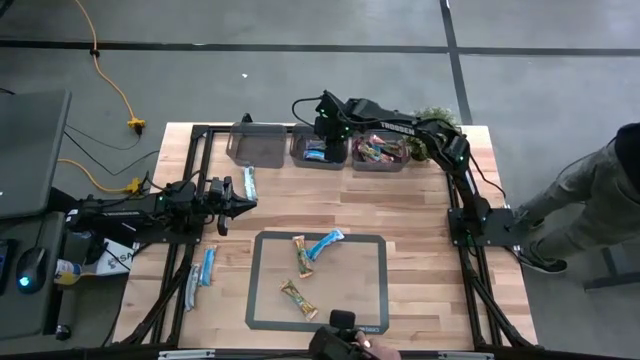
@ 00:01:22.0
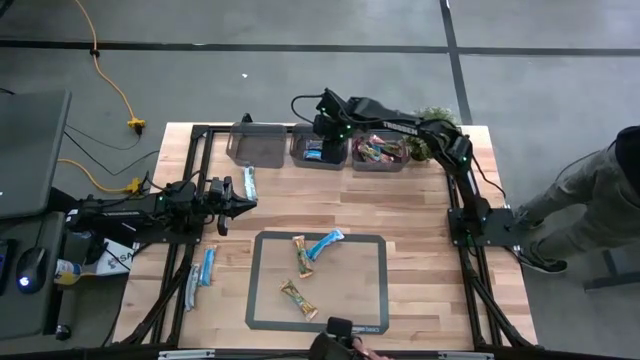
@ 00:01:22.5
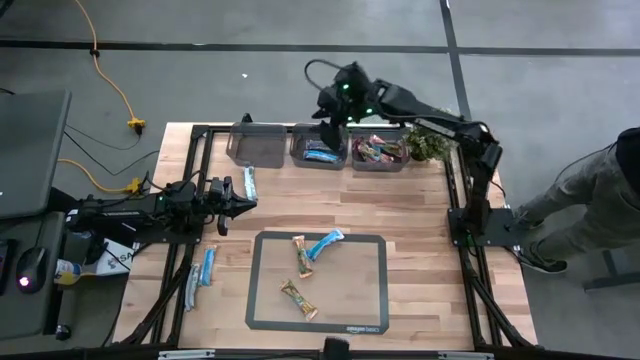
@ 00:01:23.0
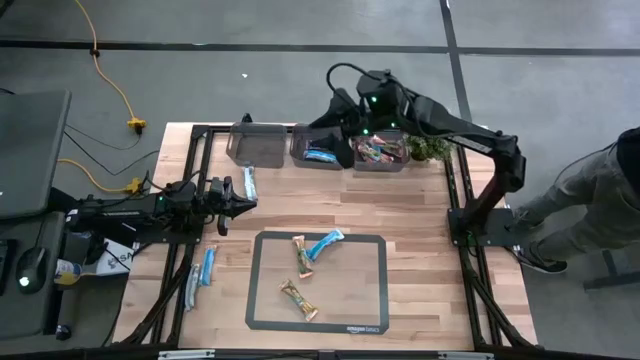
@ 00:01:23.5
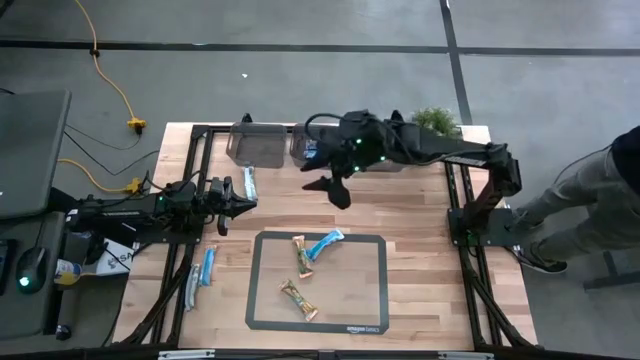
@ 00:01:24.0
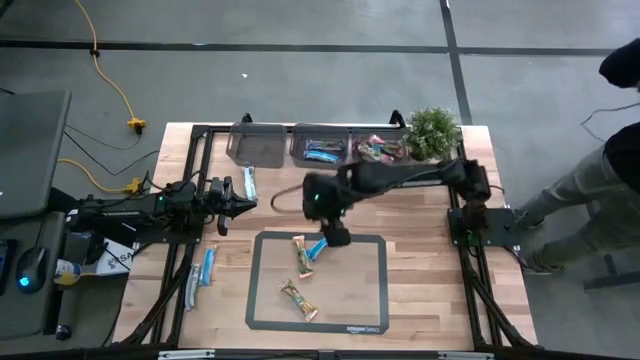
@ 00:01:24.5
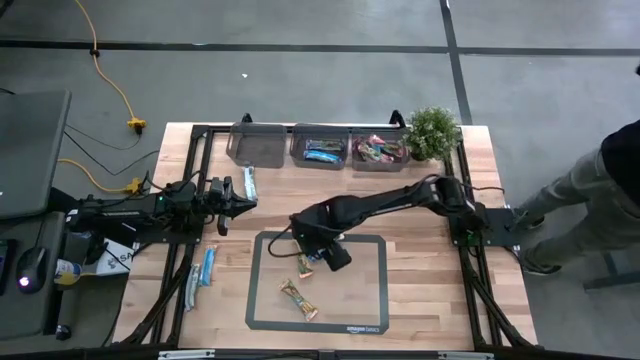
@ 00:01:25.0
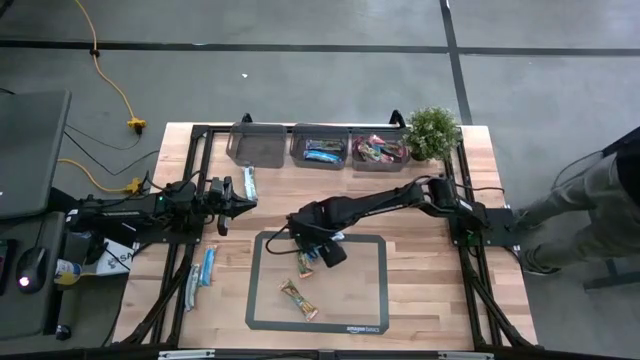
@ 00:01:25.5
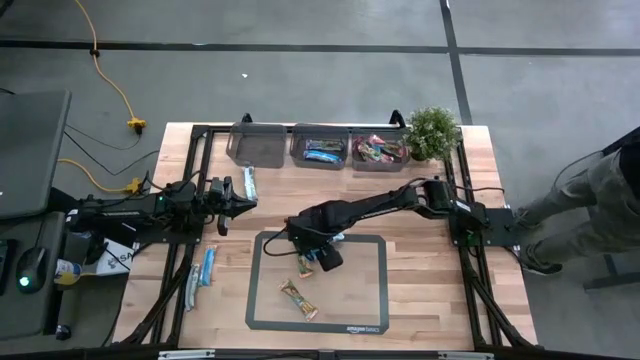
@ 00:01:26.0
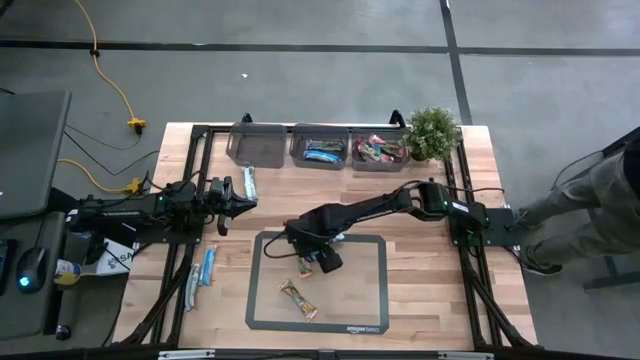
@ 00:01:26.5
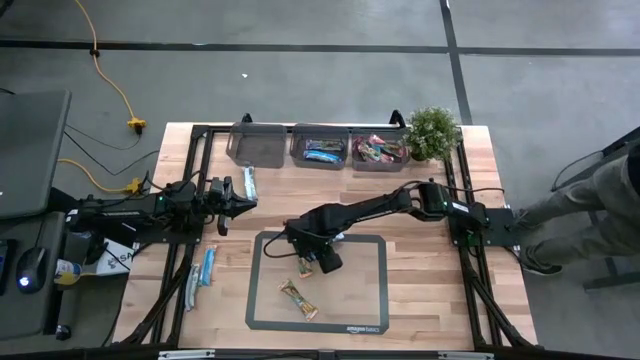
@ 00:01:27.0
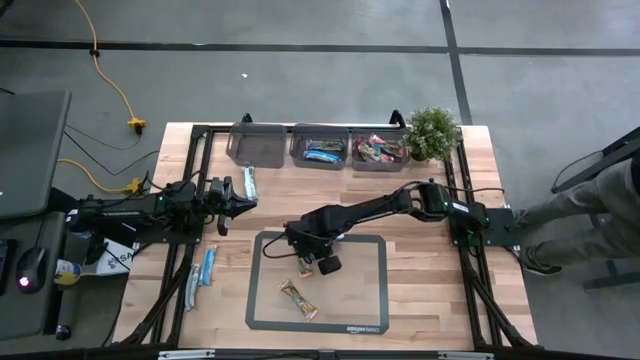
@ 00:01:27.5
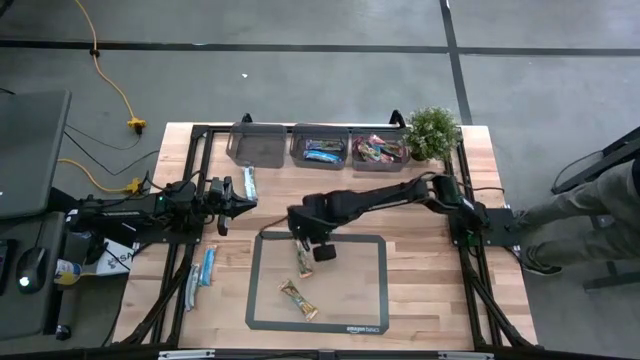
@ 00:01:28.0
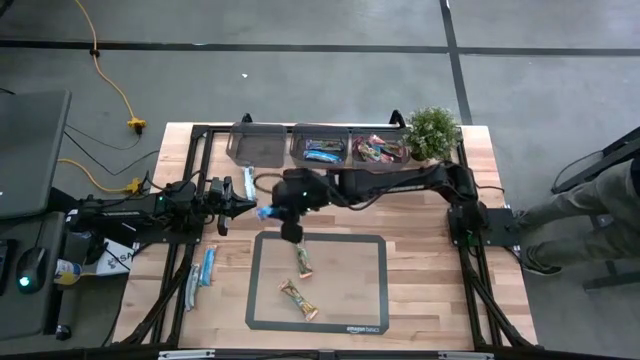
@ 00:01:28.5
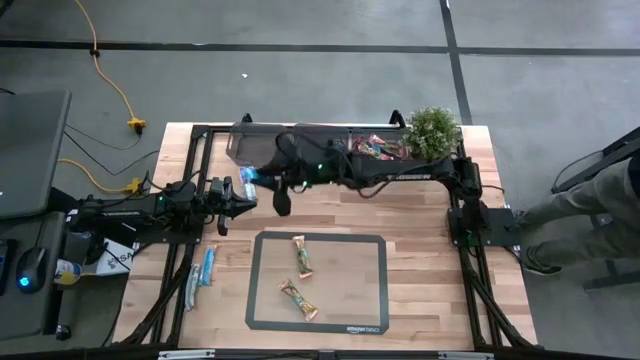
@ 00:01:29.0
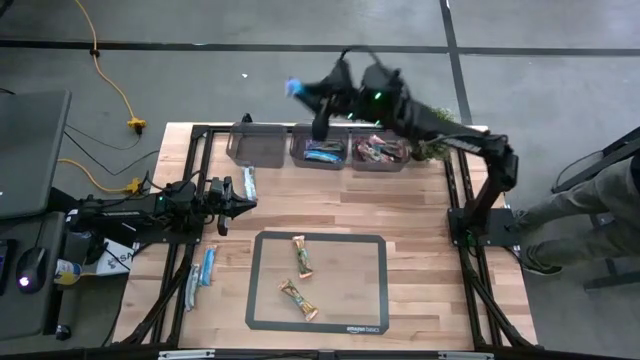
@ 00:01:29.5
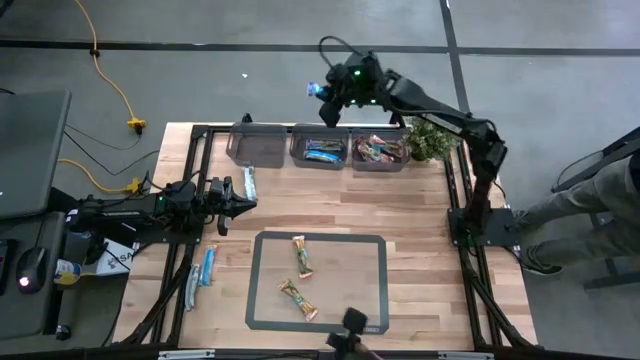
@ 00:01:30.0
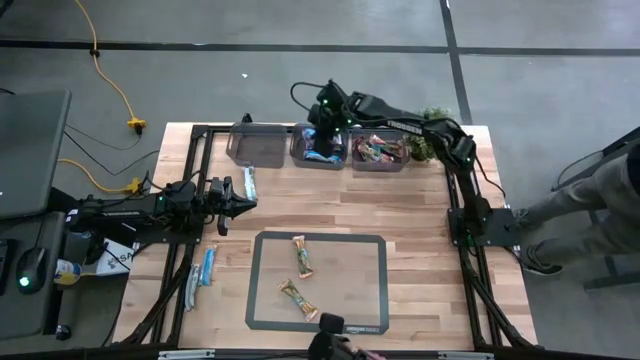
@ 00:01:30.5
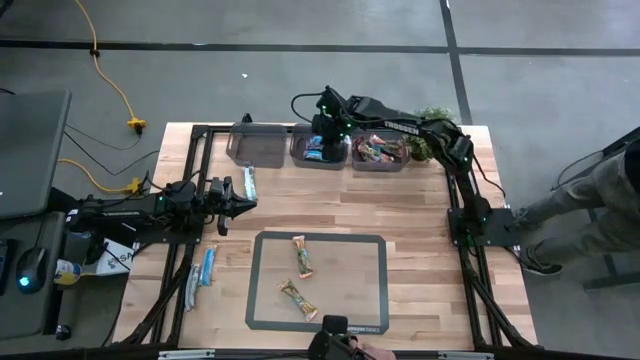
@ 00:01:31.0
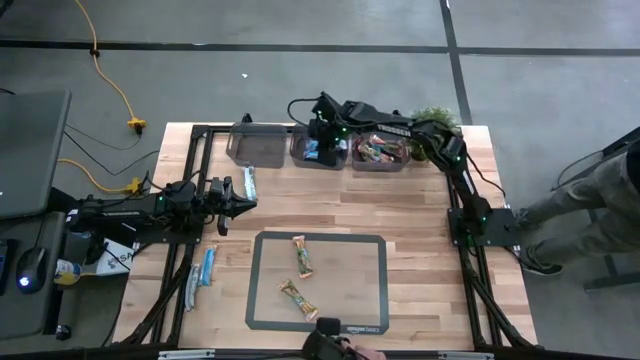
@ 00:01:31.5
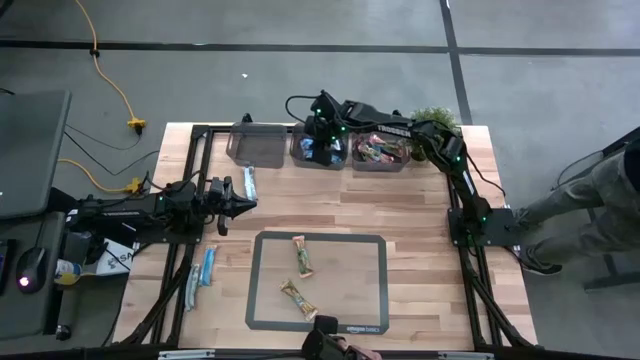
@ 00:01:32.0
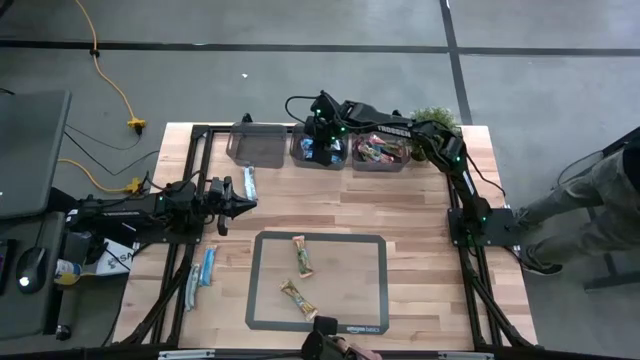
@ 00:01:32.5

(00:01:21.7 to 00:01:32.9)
Task: Pick and place Granola Bars by type
Put the blue granola bar into the middle black bin

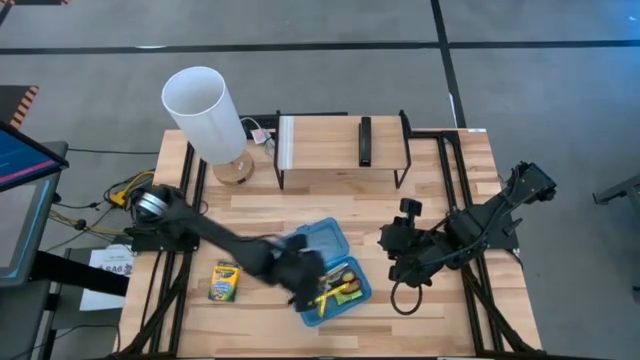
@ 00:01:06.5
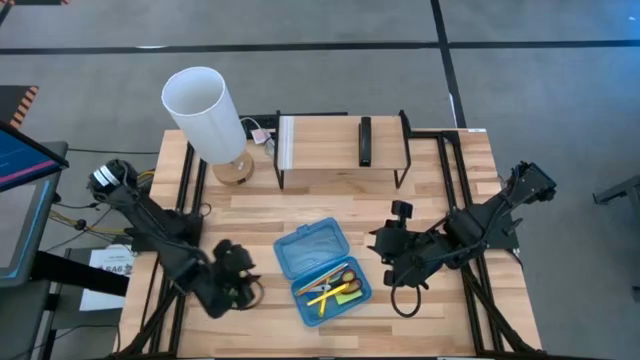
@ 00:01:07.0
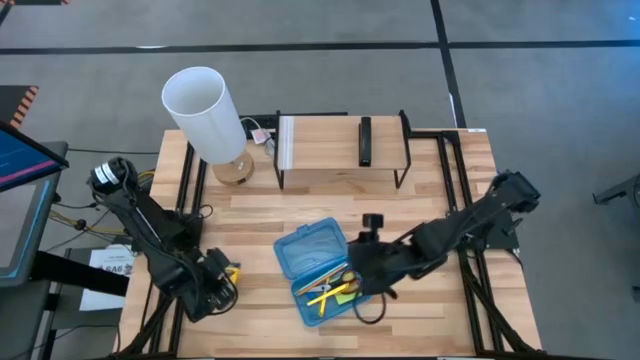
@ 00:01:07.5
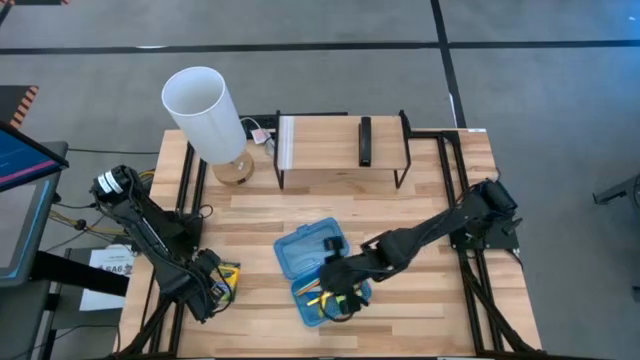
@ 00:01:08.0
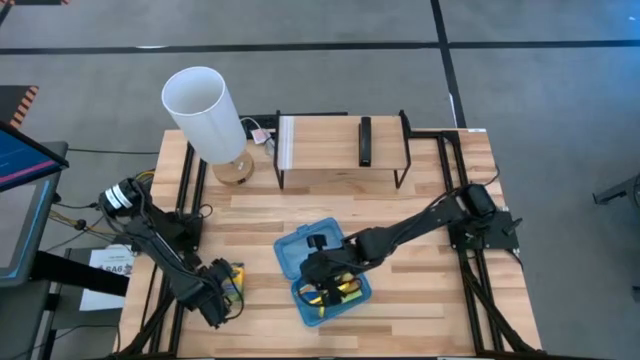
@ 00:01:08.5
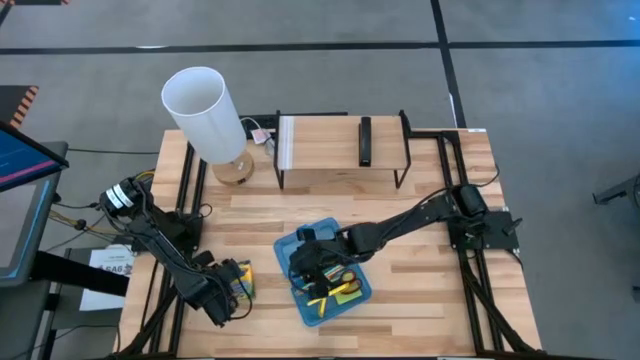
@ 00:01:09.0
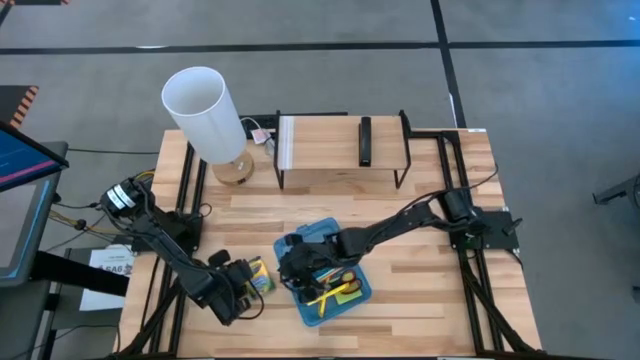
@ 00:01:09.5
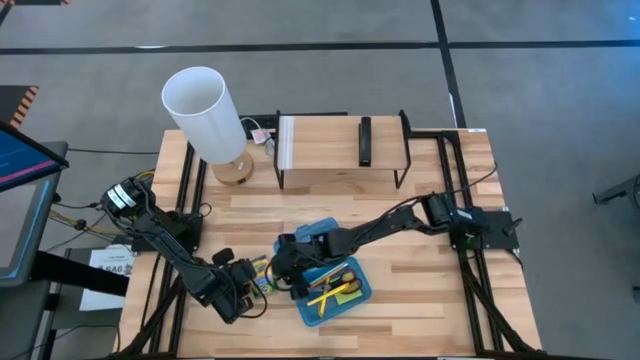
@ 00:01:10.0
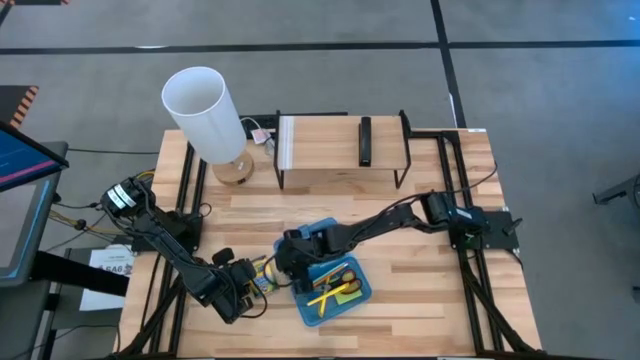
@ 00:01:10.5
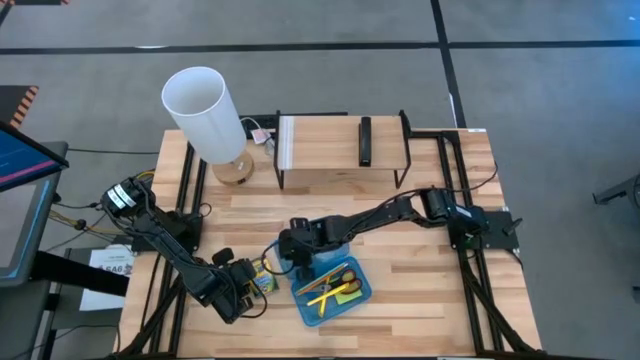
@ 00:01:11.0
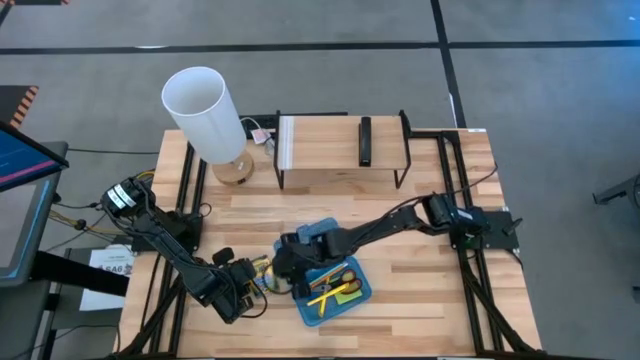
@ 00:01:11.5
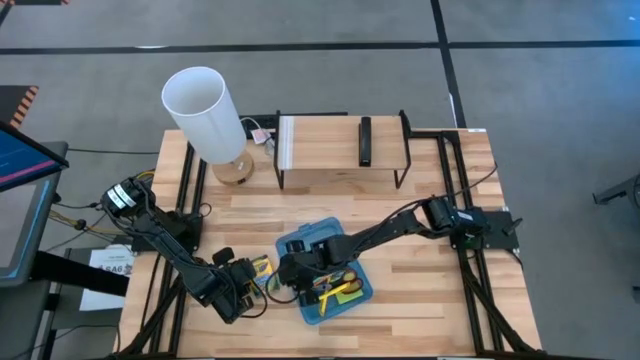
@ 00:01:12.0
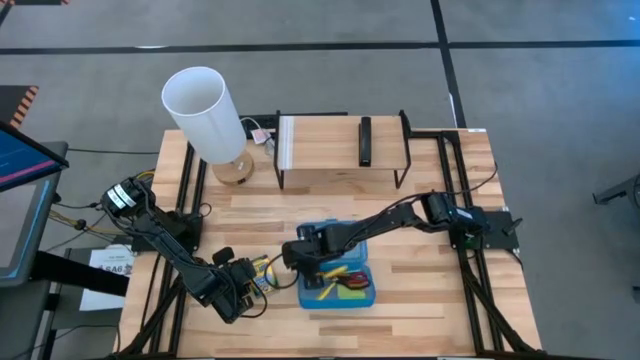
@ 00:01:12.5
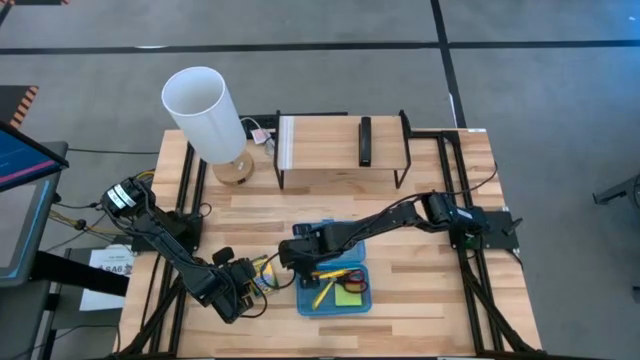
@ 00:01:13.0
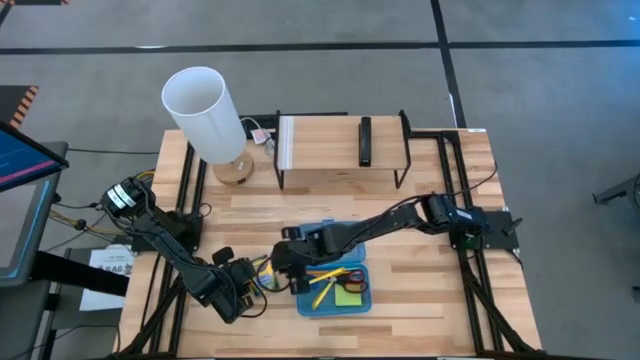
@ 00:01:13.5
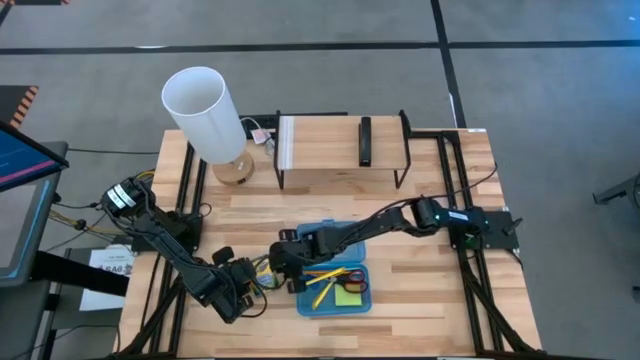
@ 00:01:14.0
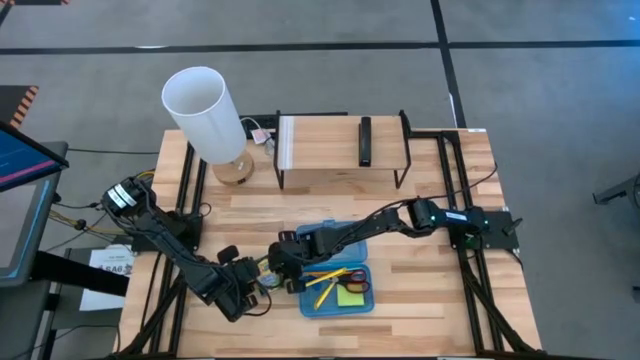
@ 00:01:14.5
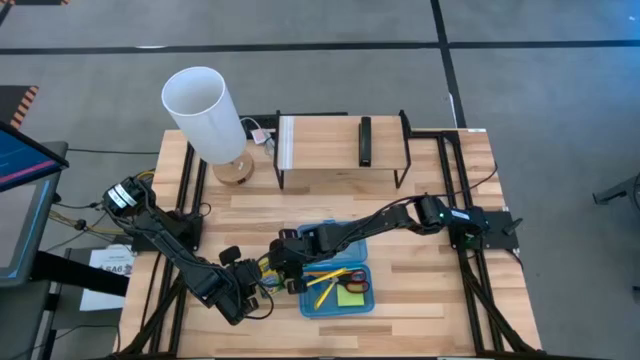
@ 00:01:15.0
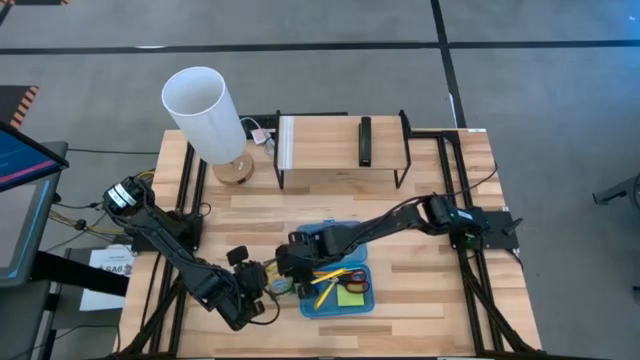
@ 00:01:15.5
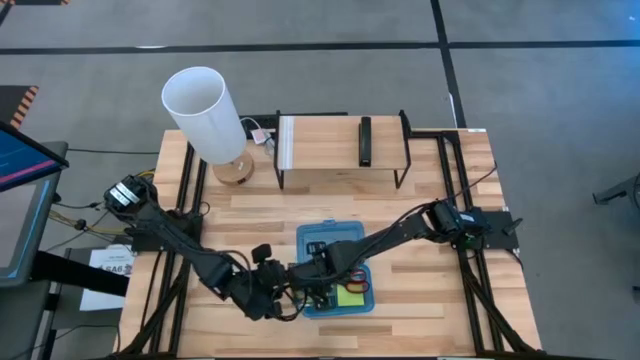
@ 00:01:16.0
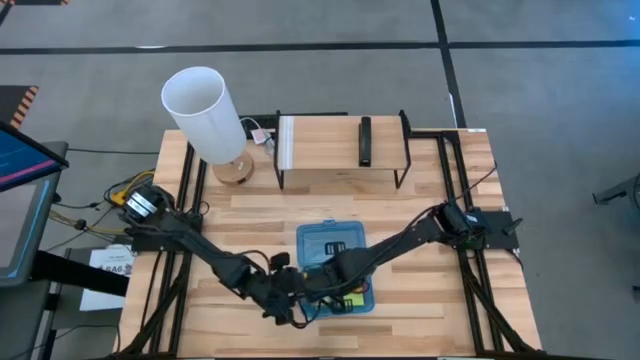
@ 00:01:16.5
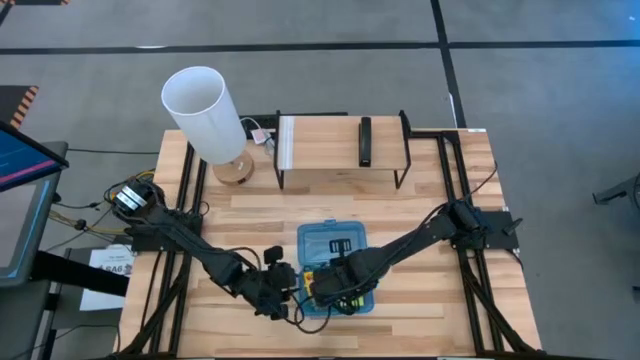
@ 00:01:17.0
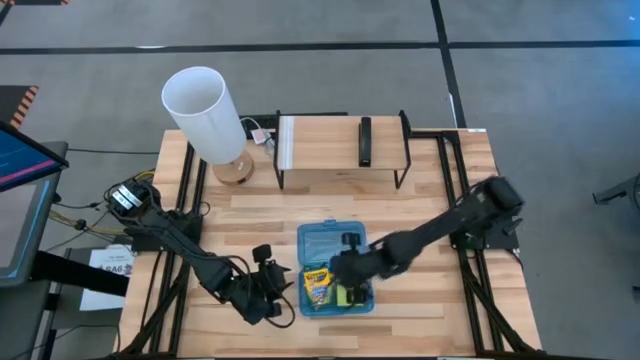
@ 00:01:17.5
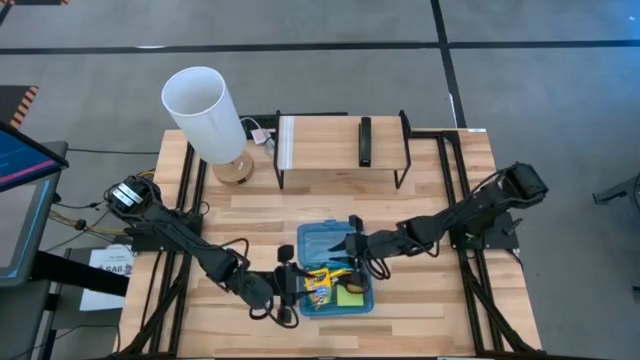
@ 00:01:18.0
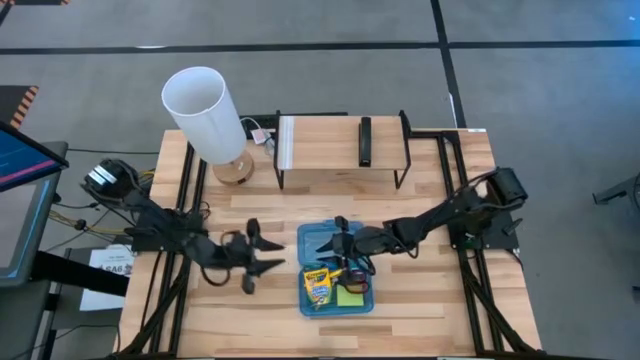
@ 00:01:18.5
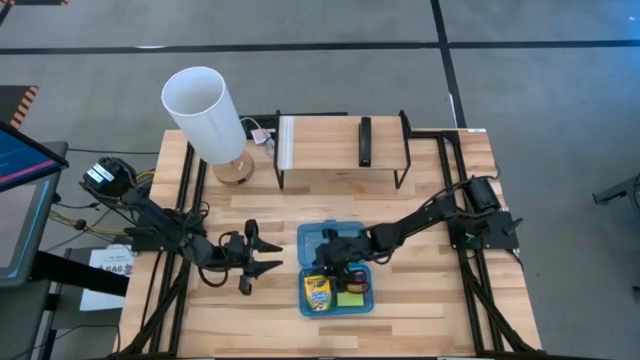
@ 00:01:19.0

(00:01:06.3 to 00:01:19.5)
Task: Pack school essentials
Put the box of crayons into the blue supply box
